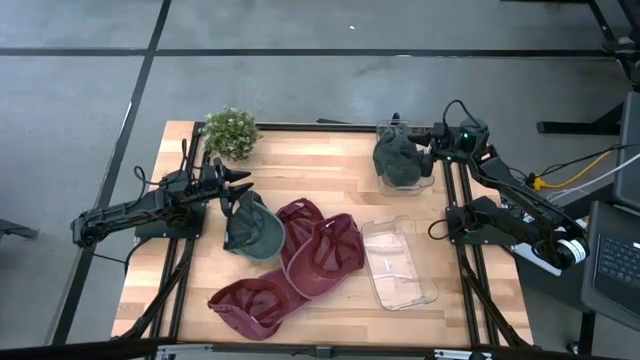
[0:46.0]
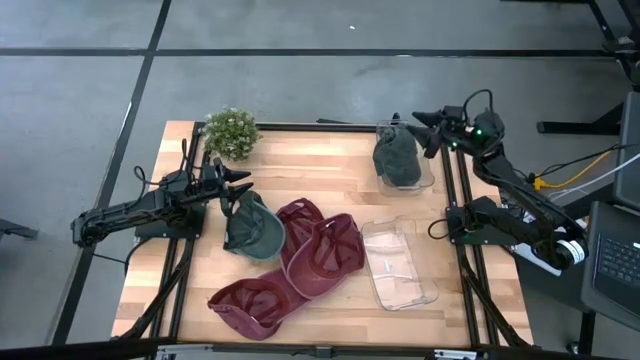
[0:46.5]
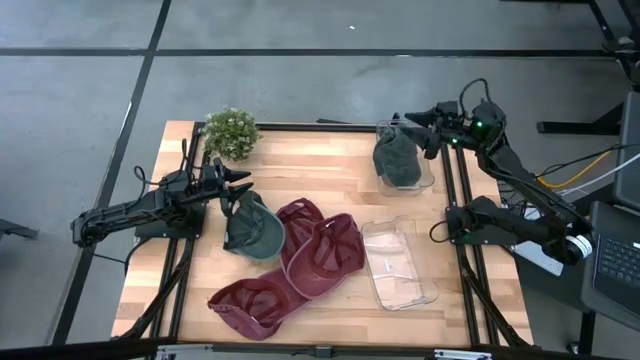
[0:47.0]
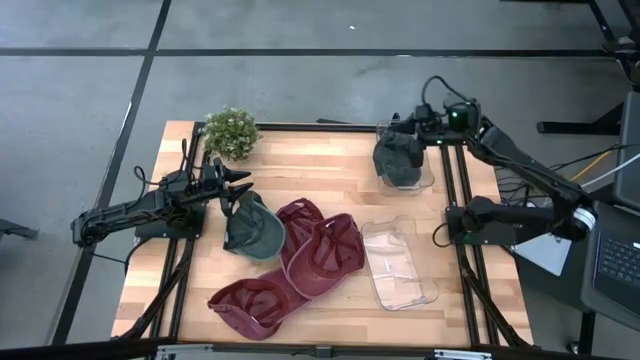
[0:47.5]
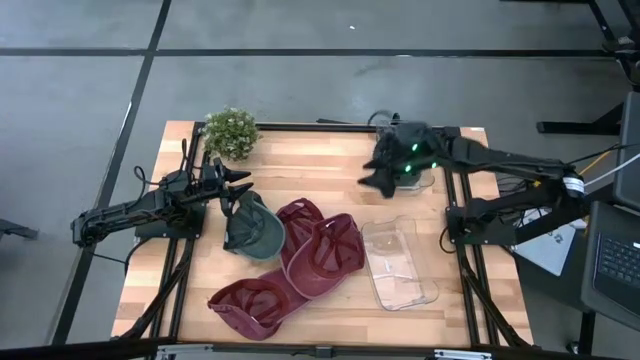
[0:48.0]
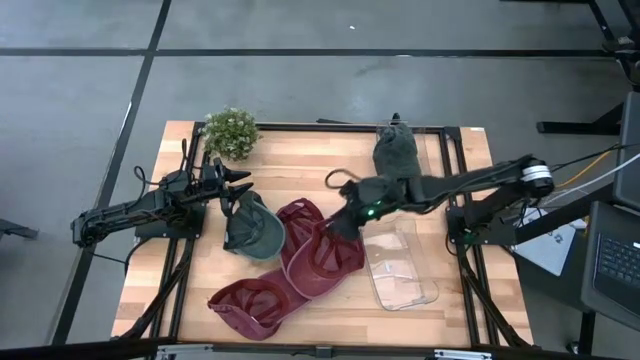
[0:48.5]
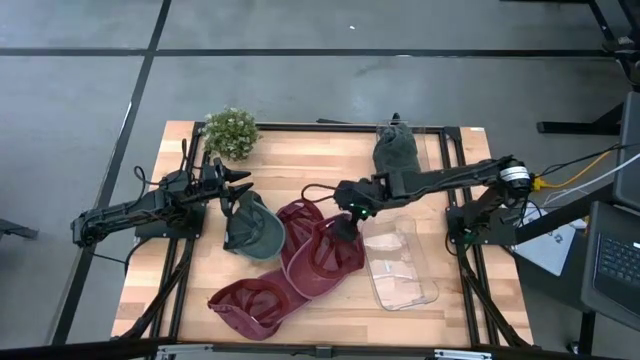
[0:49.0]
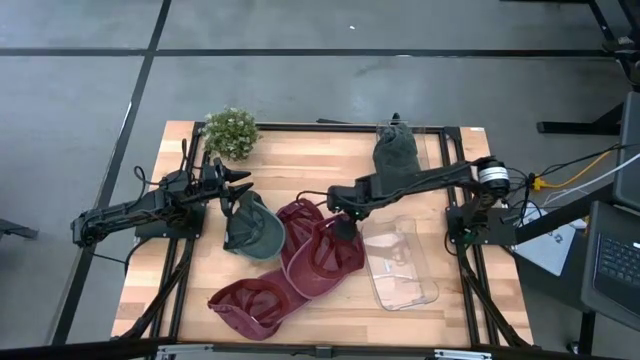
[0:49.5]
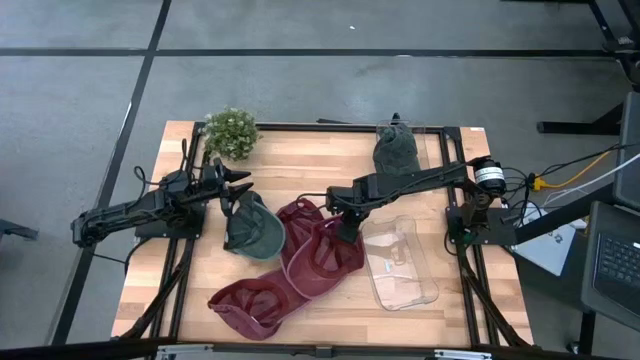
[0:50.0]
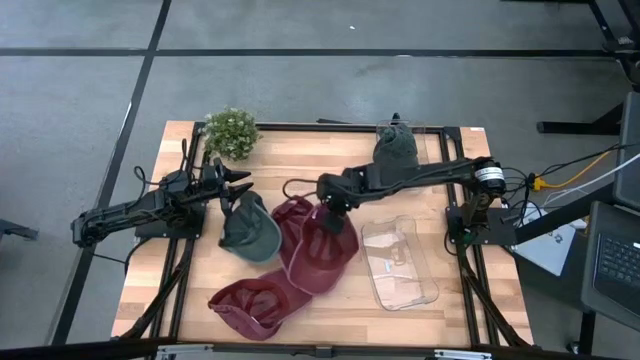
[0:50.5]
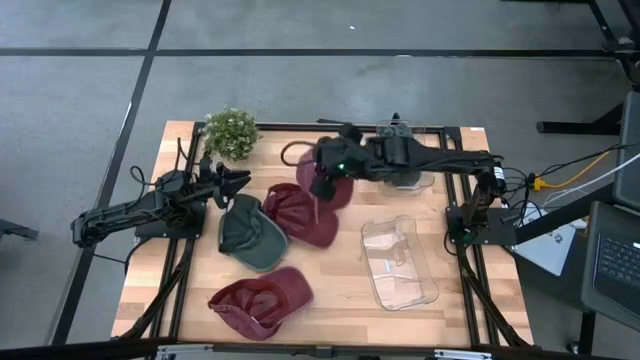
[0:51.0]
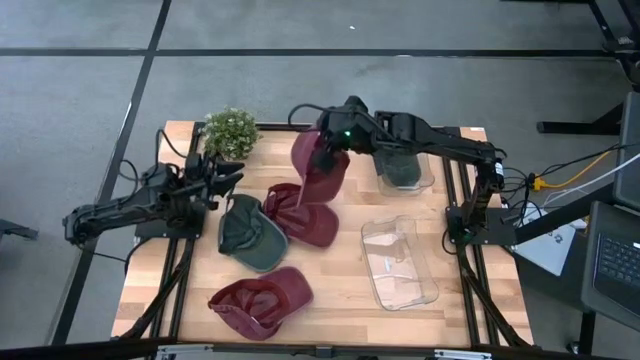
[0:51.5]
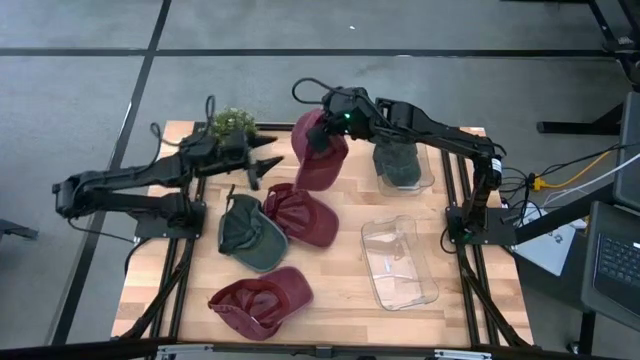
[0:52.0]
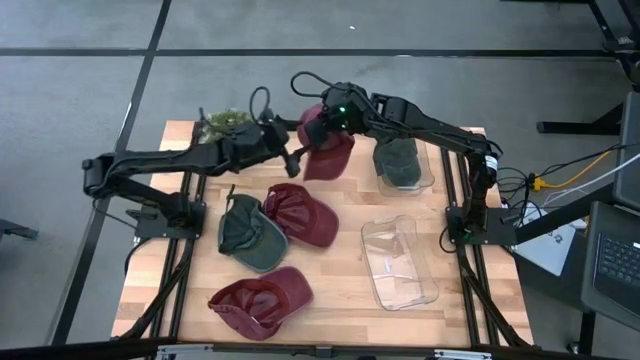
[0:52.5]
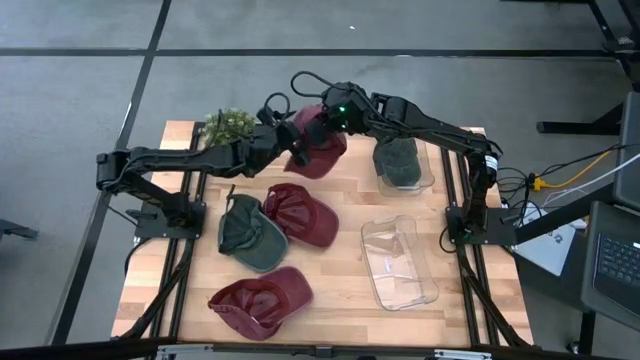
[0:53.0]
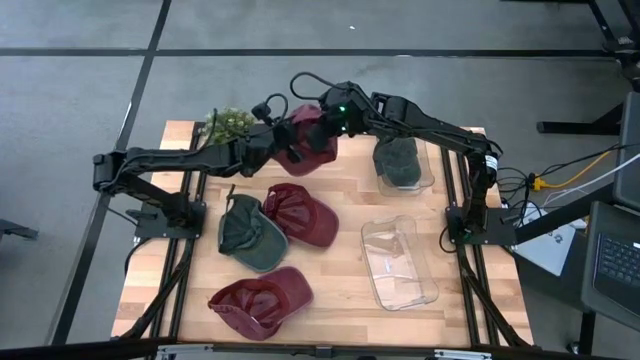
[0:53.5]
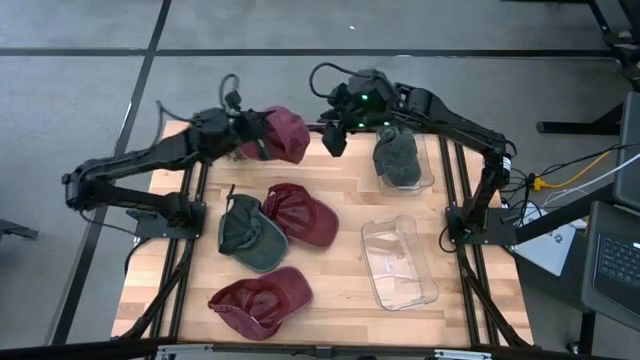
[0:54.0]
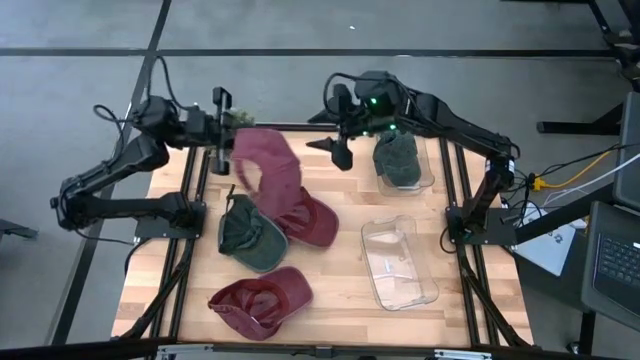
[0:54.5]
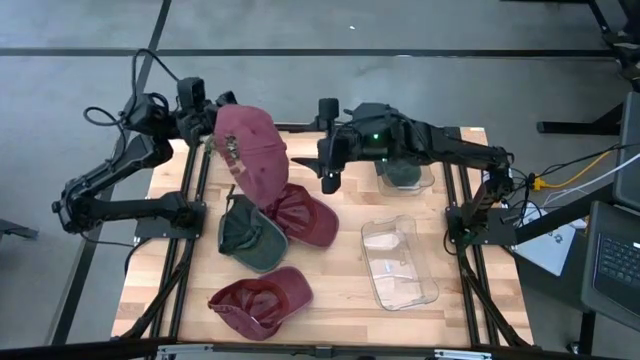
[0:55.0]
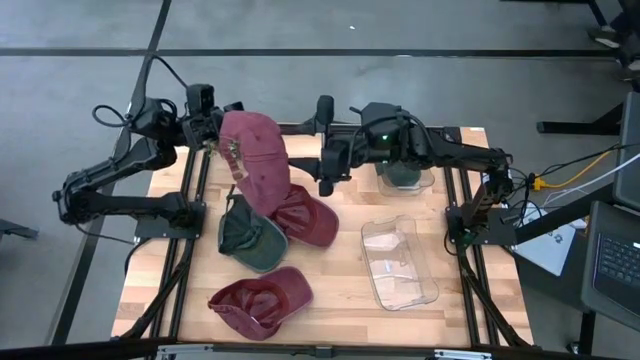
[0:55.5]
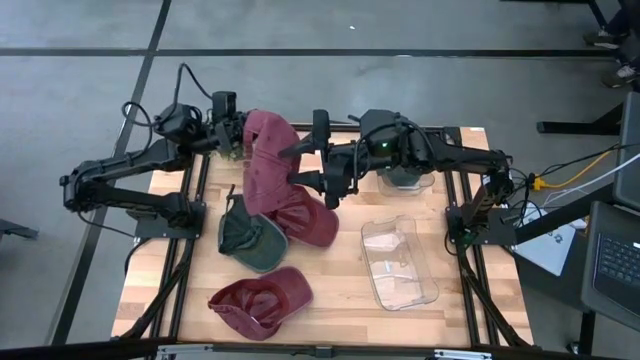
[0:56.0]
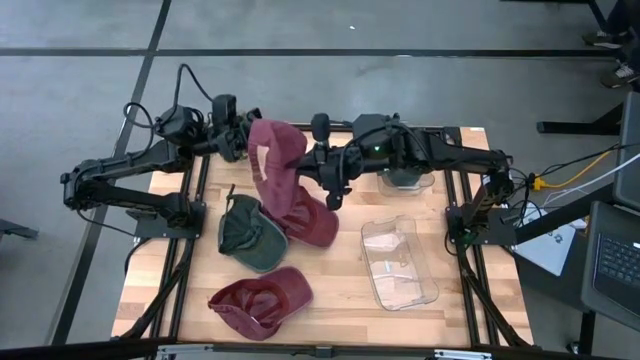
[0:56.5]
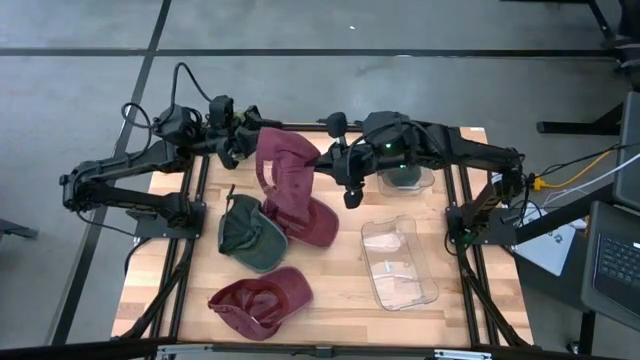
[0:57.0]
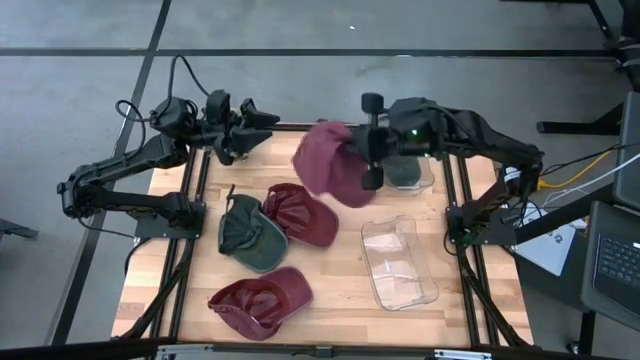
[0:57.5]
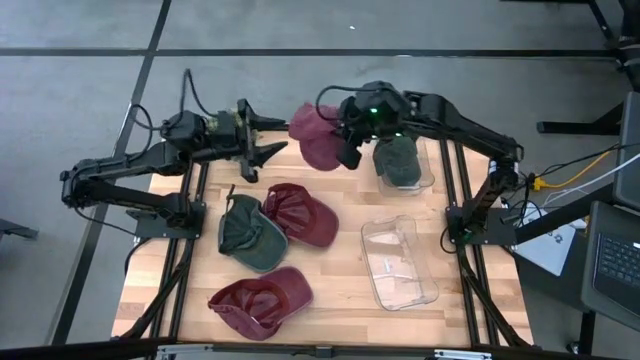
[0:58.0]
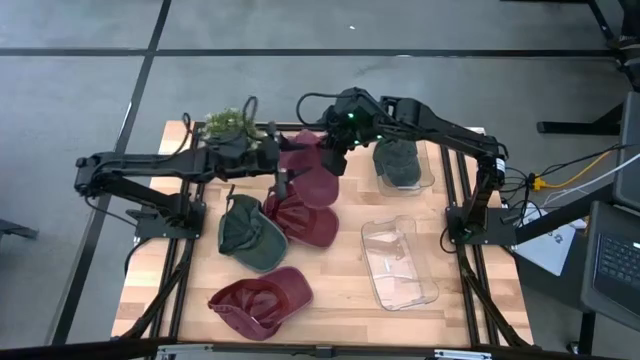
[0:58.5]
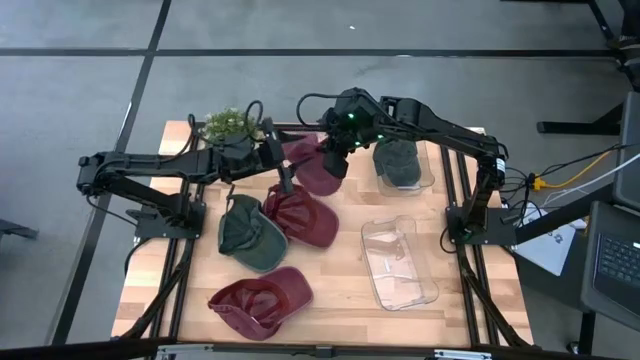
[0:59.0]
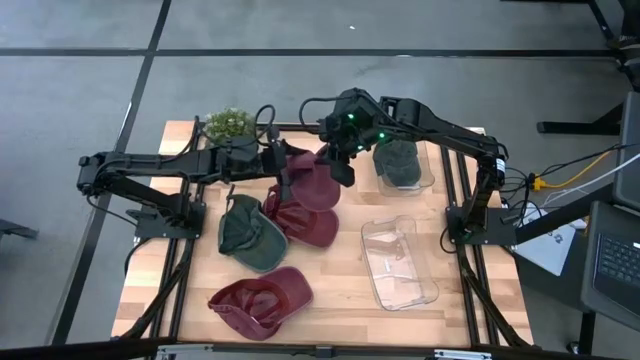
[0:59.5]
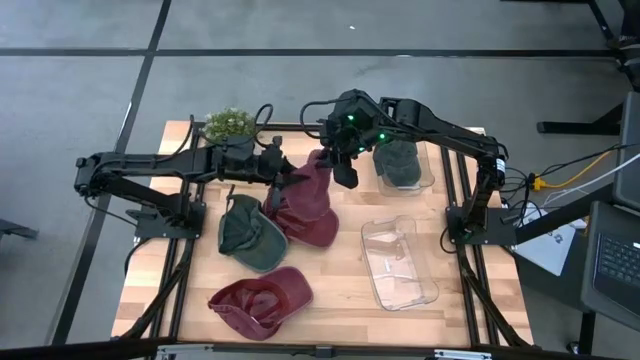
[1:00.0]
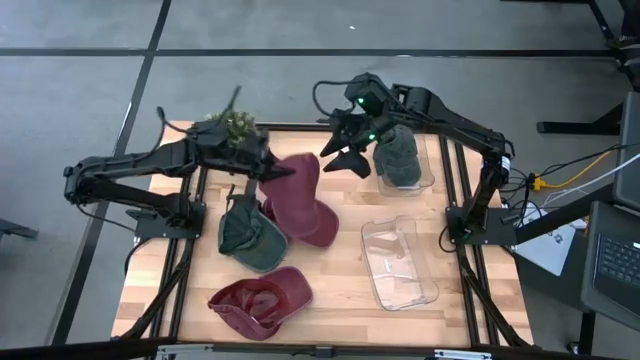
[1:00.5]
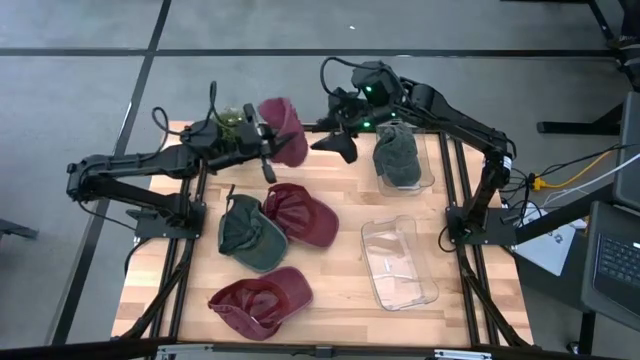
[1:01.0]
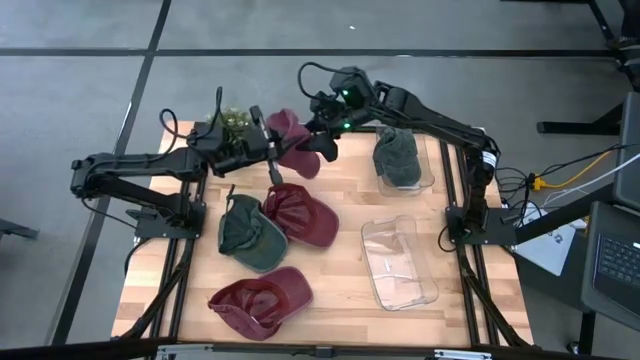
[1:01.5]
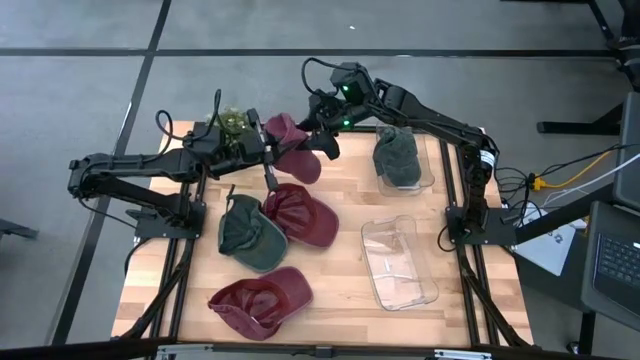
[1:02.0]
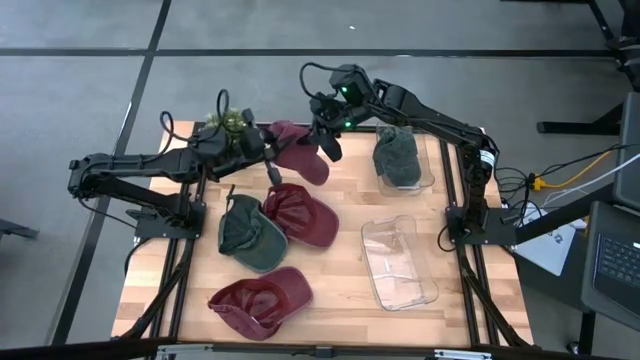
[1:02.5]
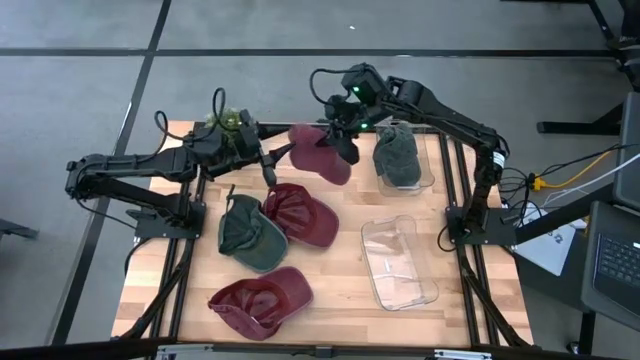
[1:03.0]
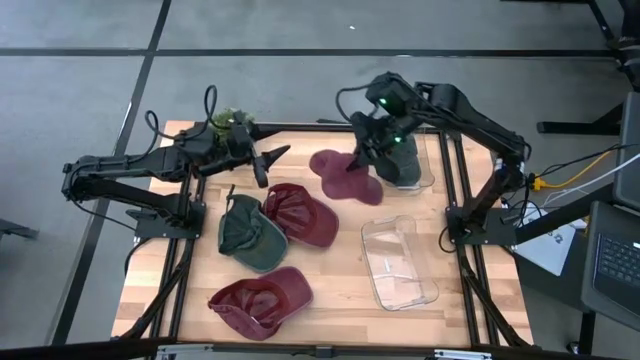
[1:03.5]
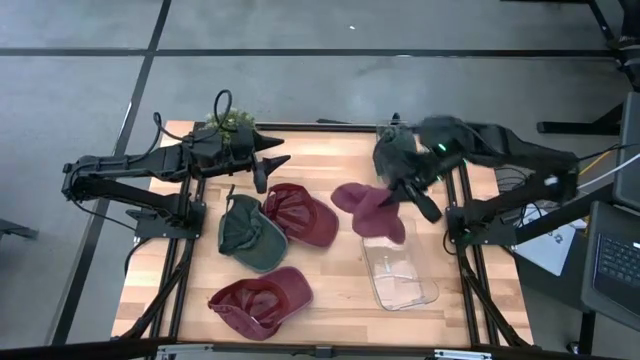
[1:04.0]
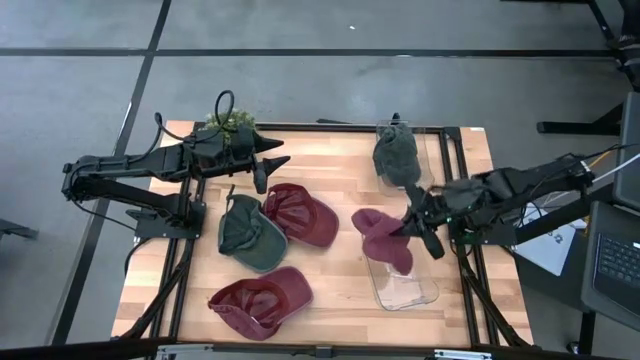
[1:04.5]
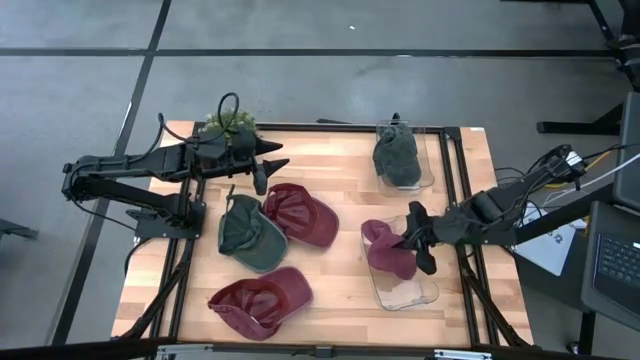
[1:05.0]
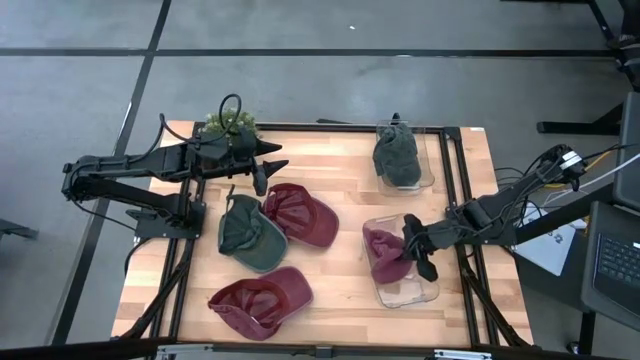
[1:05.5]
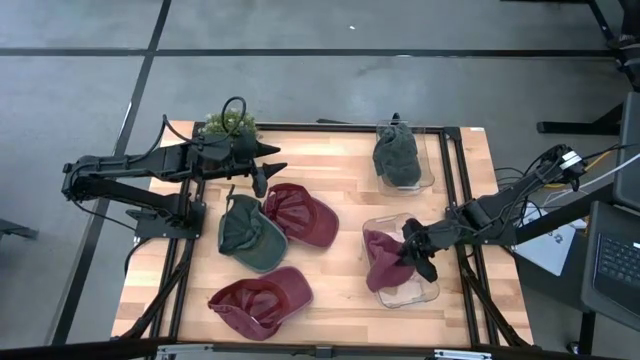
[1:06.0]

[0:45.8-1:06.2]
Task: Pick & Place hat
Put the right red cap into the bottom transparent bin

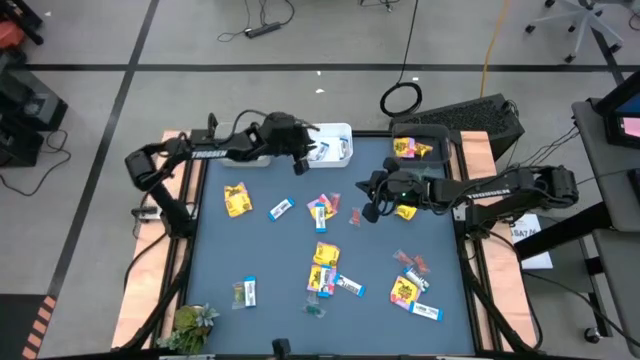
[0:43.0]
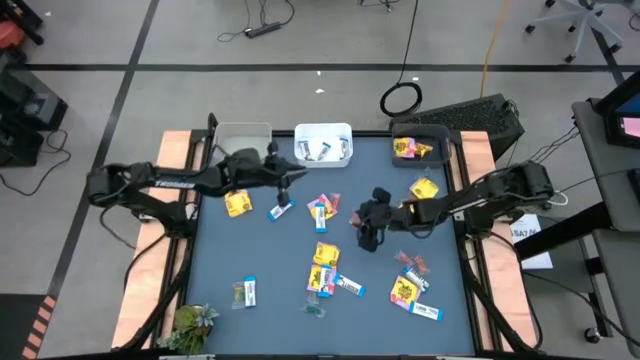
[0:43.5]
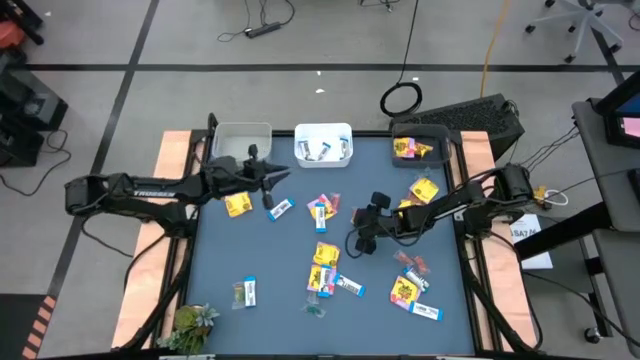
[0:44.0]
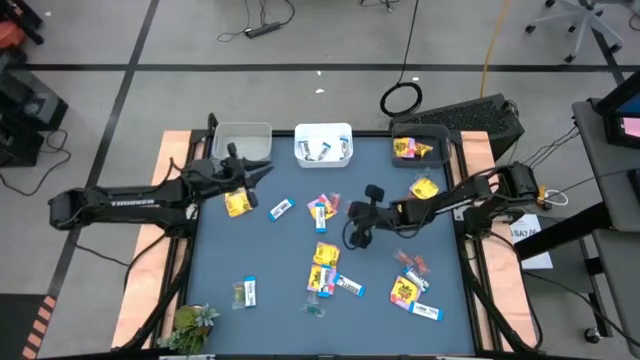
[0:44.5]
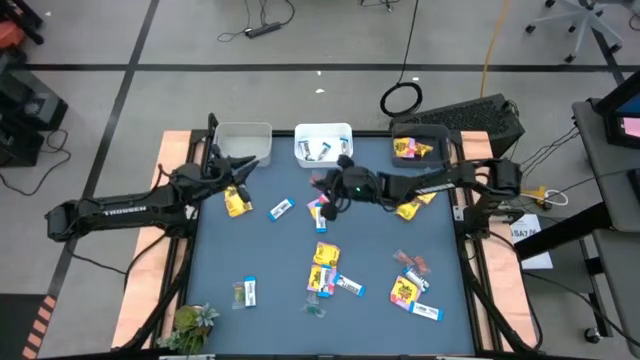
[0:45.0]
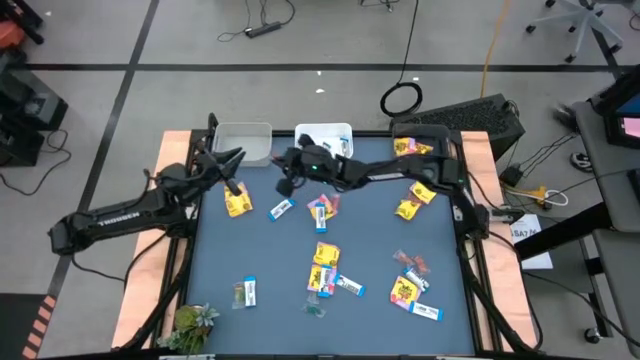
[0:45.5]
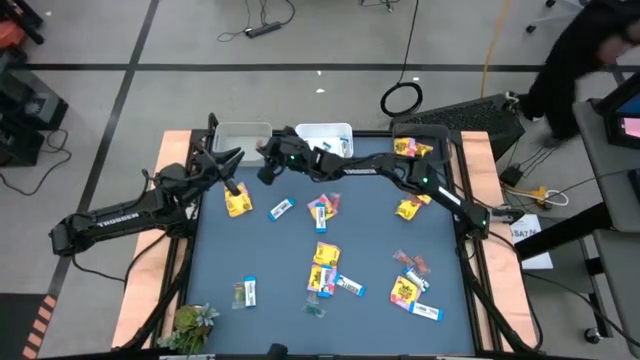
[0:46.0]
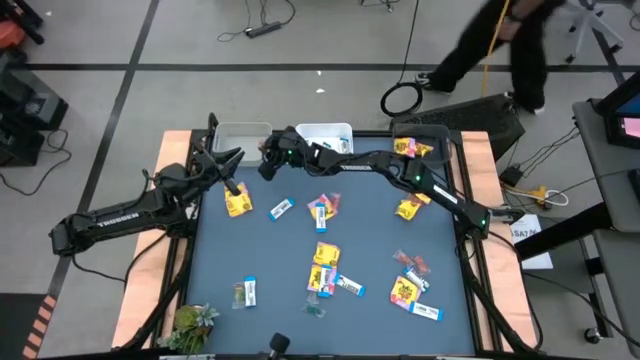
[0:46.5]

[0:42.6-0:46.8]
Task: Sort candy
Put the orange gummy into the gray bin
